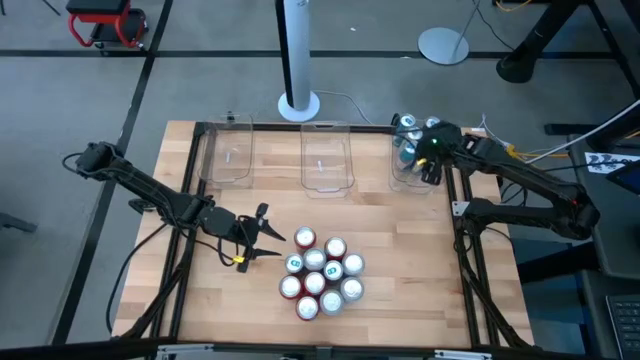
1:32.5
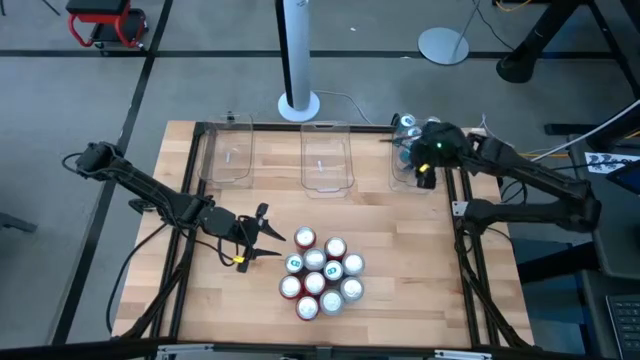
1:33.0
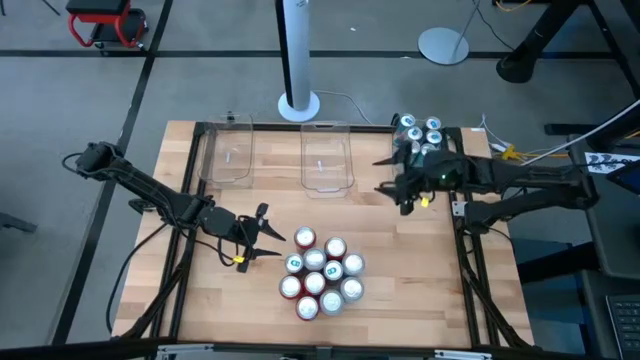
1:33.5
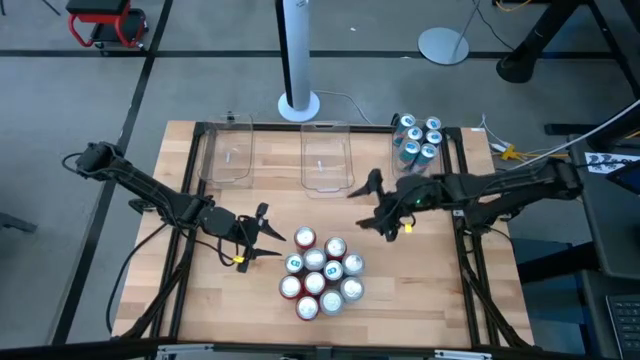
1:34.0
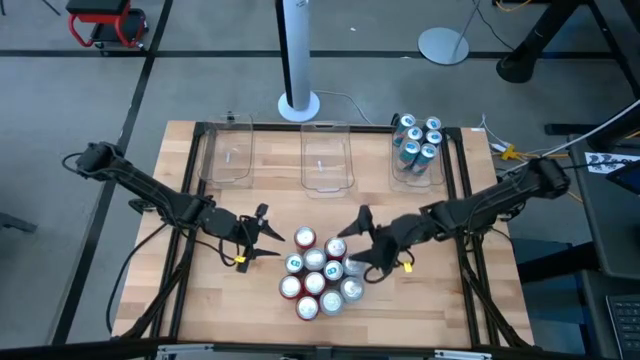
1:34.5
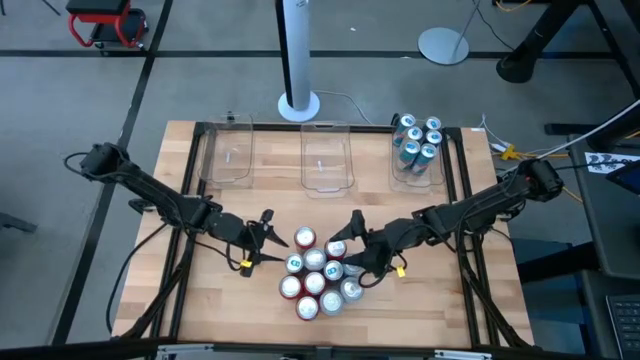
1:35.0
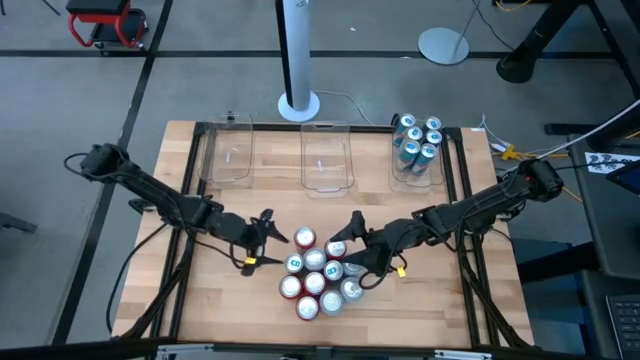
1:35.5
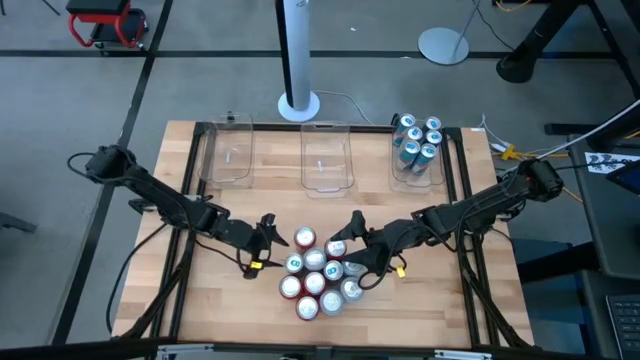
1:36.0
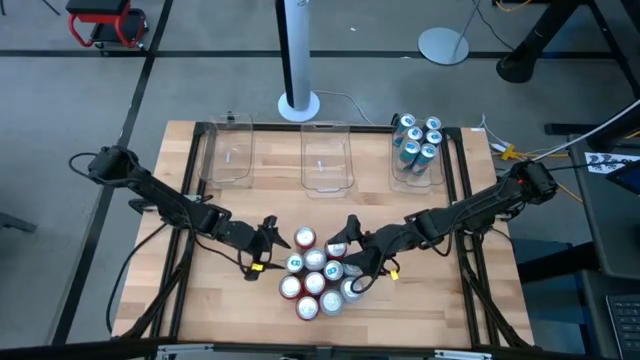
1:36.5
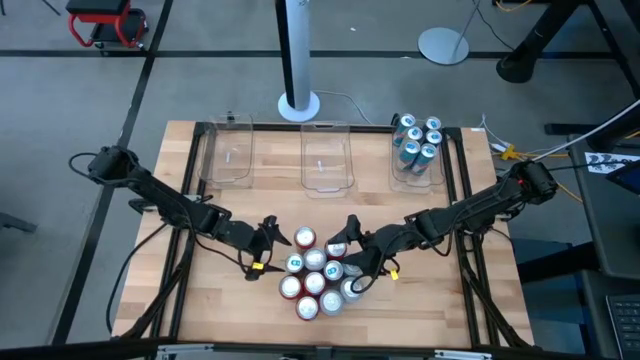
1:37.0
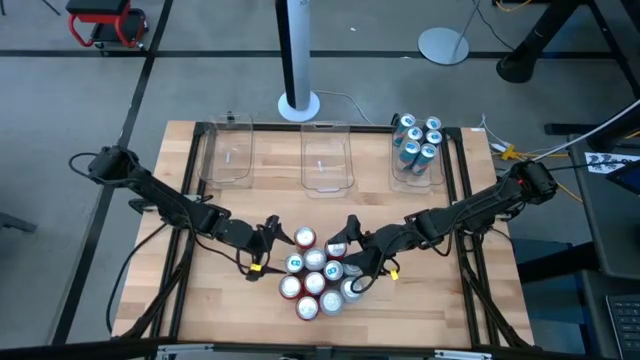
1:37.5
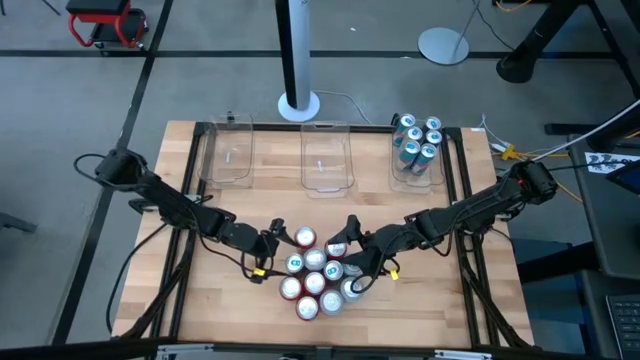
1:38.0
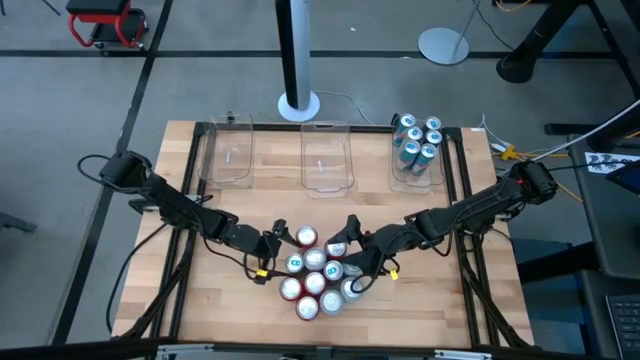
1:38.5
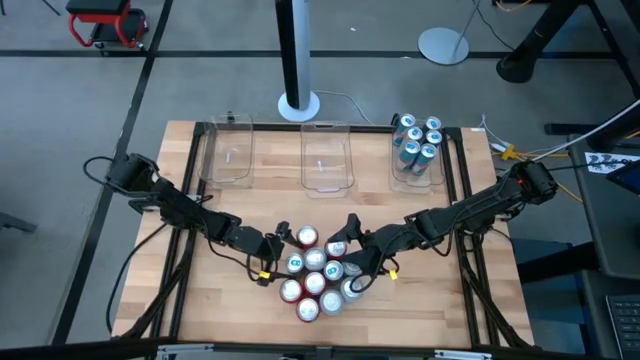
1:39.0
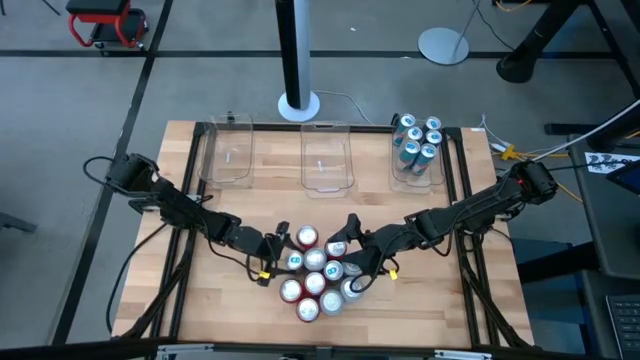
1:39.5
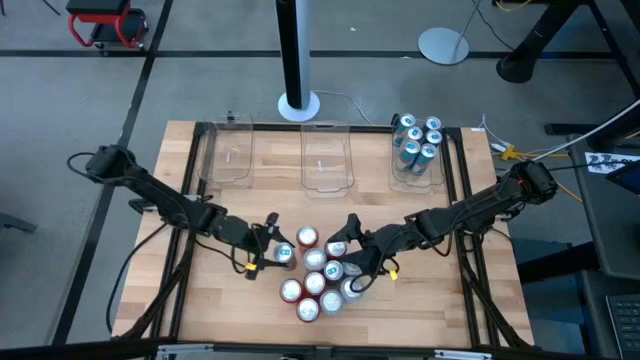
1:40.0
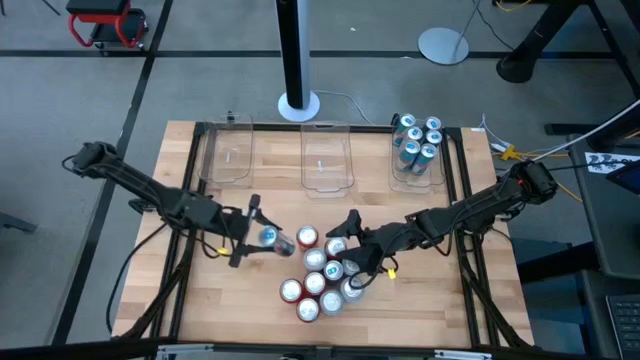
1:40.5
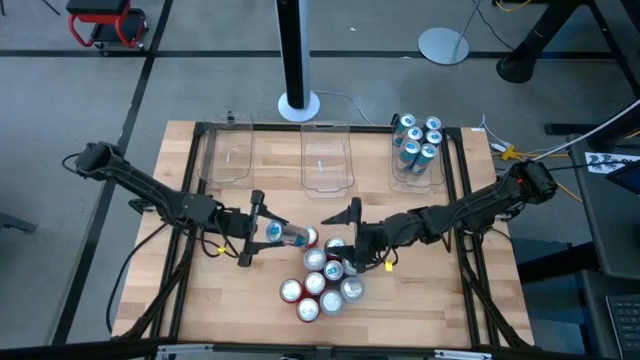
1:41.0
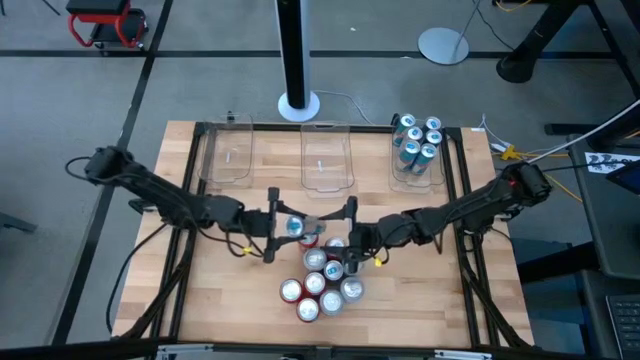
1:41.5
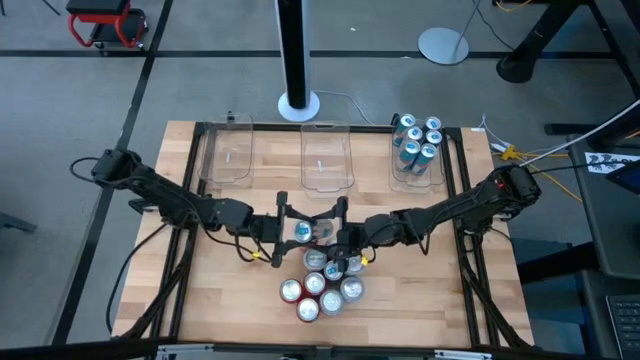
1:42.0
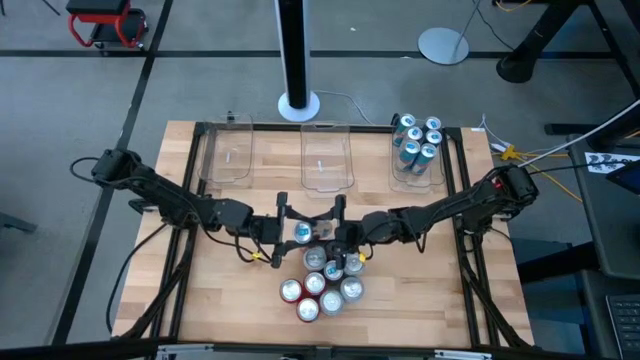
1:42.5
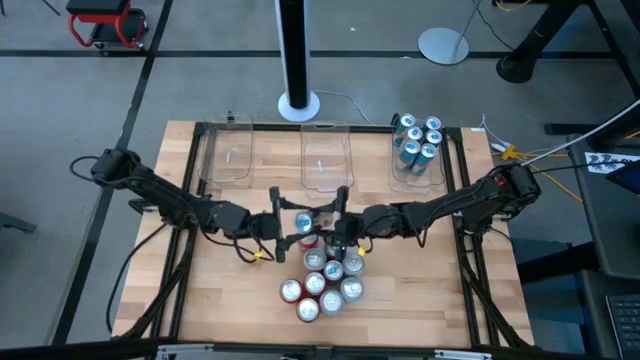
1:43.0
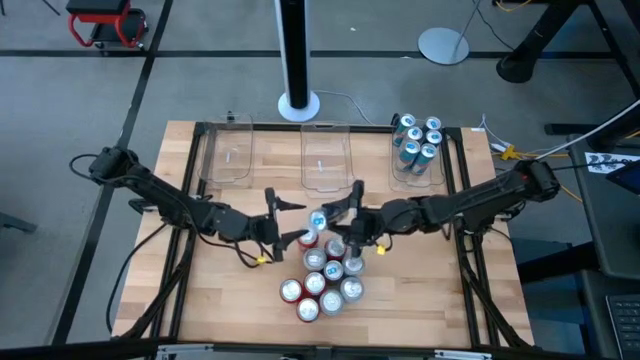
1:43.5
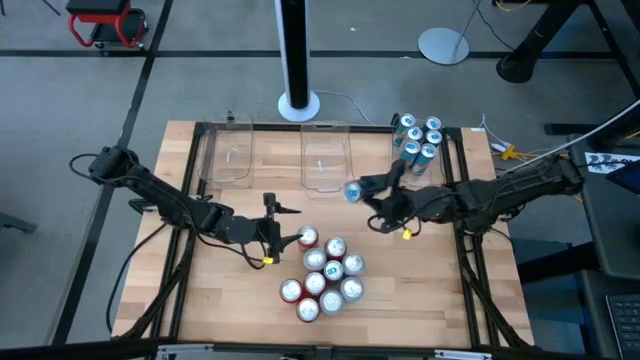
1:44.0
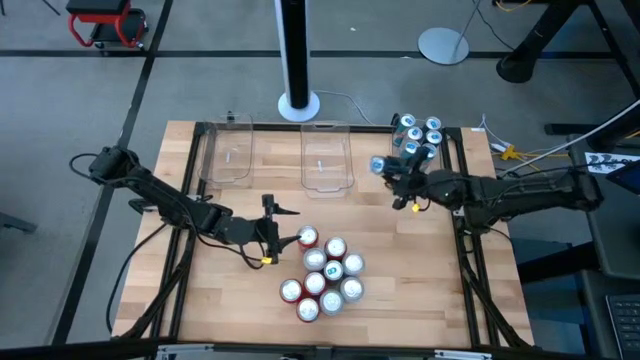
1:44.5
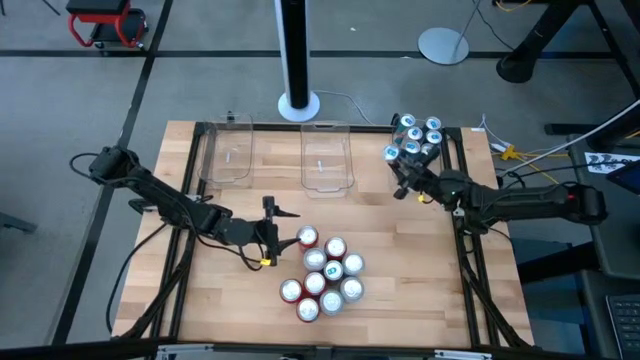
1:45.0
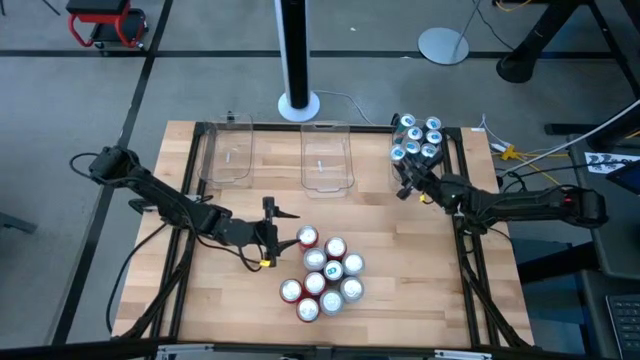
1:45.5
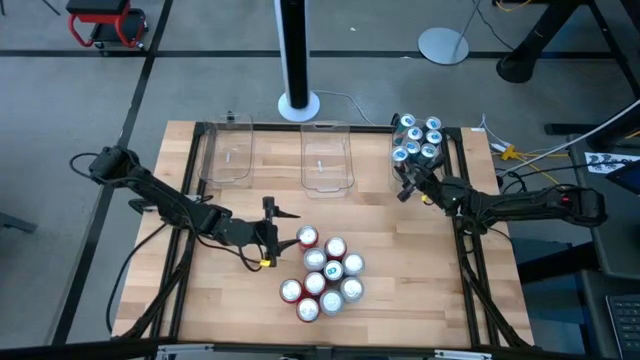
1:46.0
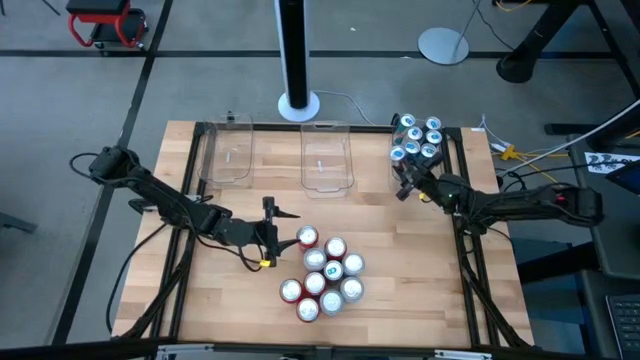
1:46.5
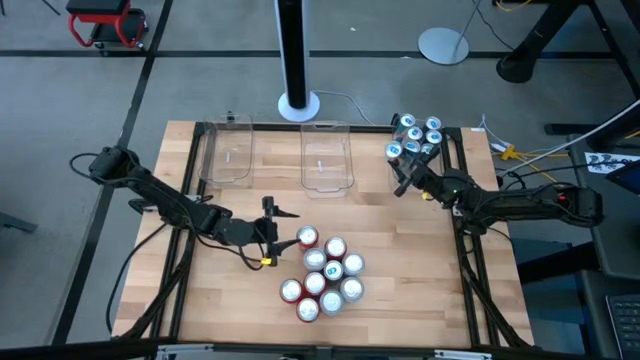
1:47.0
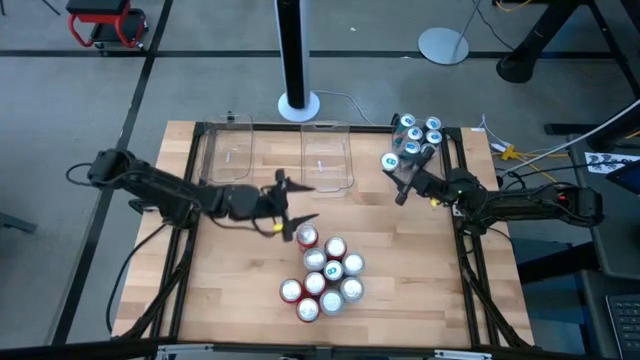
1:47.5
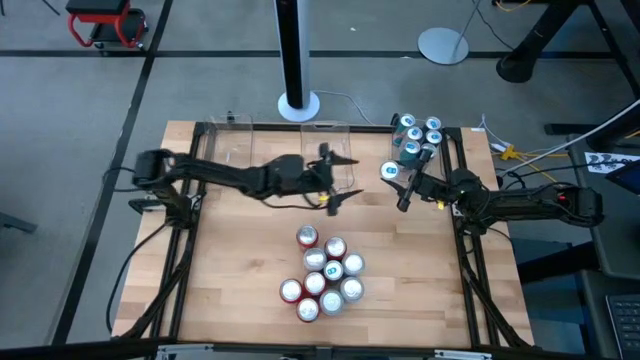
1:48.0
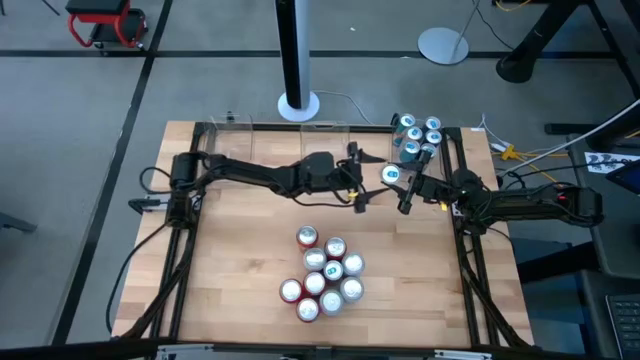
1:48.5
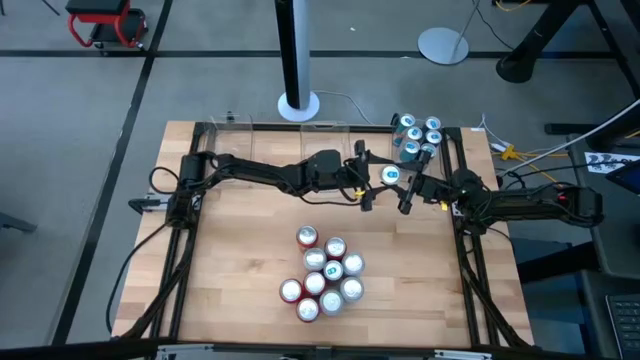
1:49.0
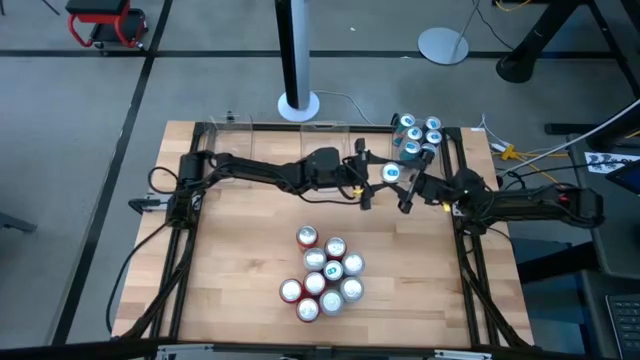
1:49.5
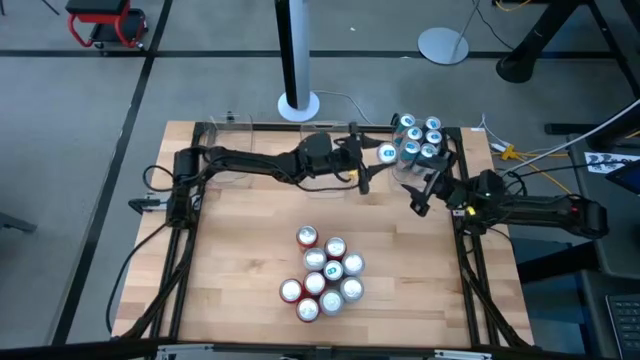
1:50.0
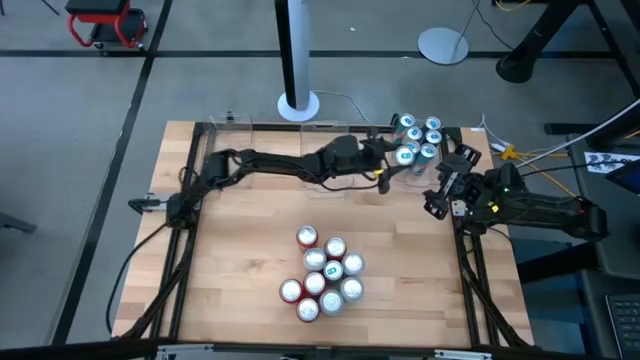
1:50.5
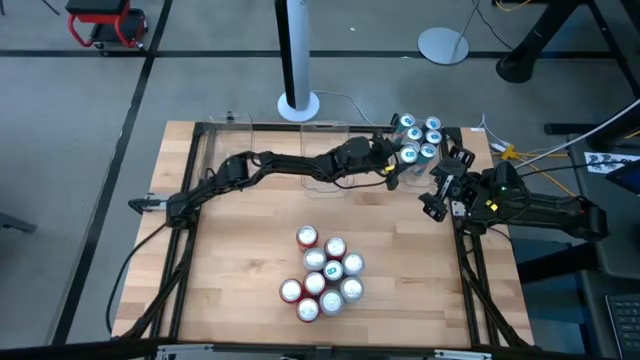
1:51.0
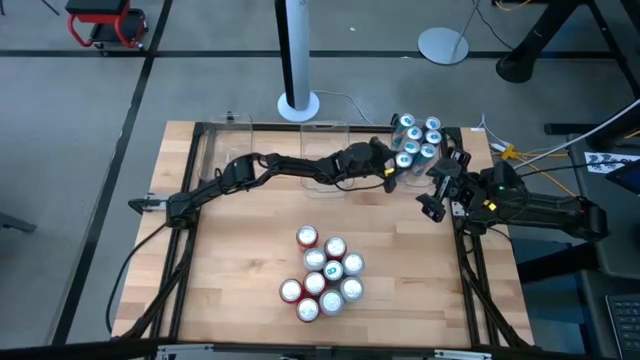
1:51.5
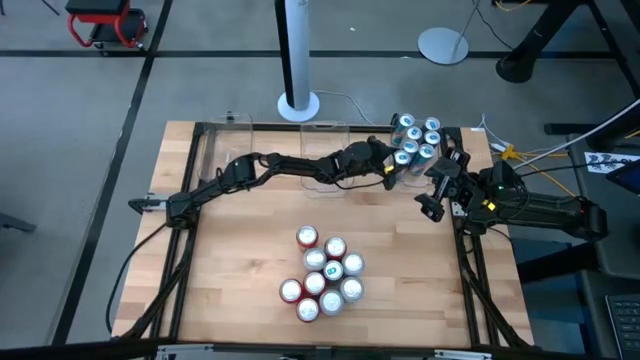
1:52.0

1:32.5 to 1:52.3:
Task: Sort soda cans
Put the blue soda can into the top right transparent bin

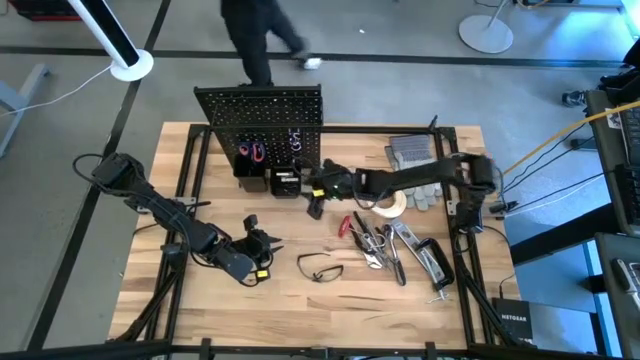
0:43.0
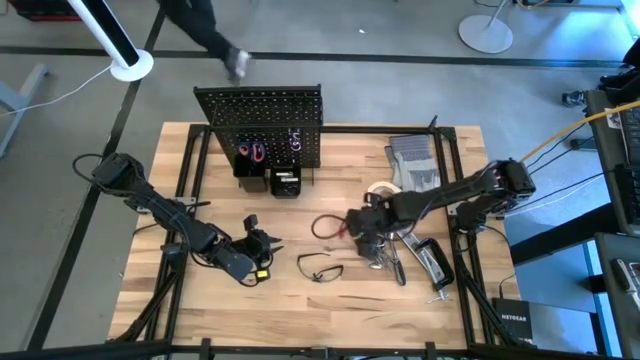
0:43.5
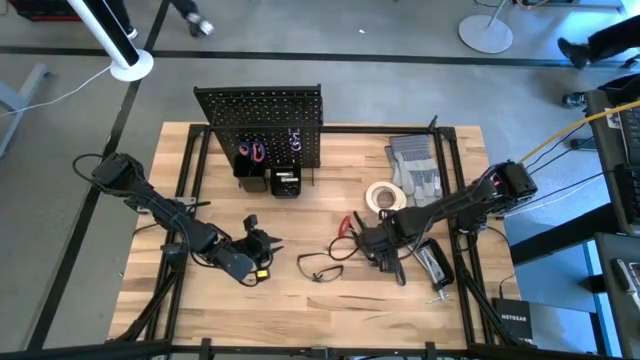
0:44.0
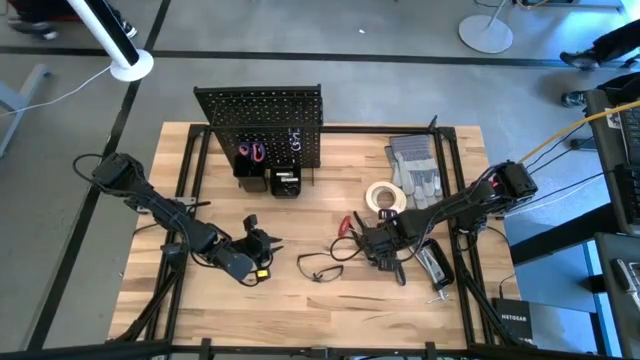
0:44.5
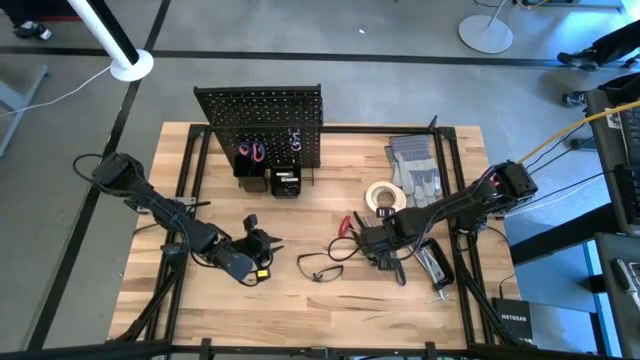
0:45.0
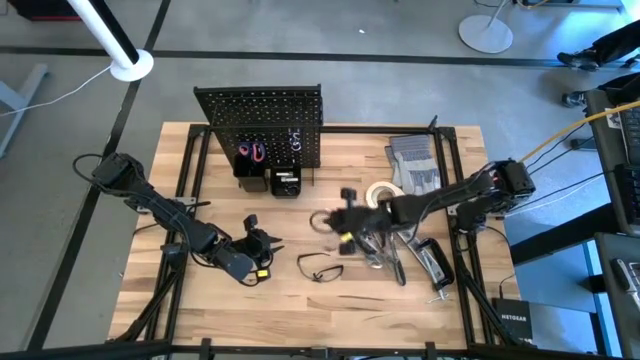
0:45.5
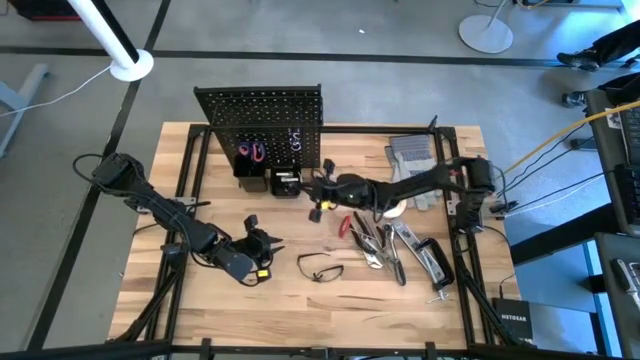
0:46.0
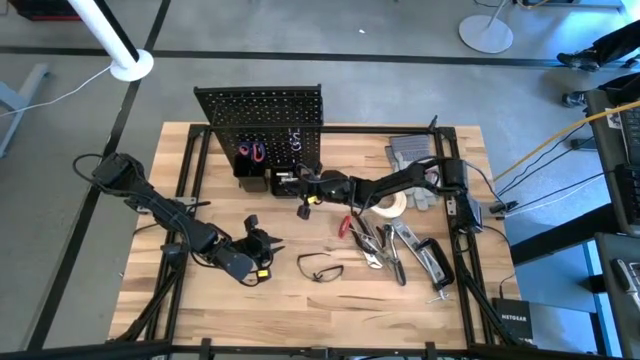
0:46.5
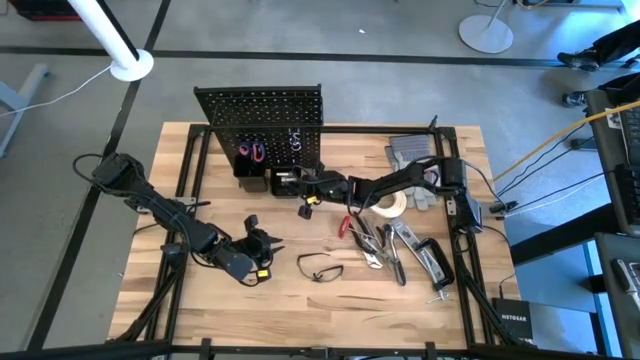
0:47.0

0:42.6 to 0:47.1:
Task: Hang tools onto peg board
Put the hook into the right pegboard organizer bin
